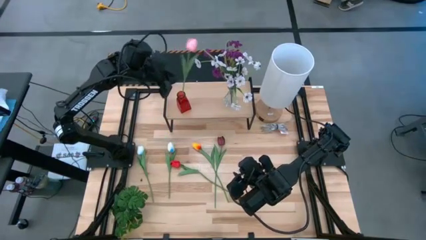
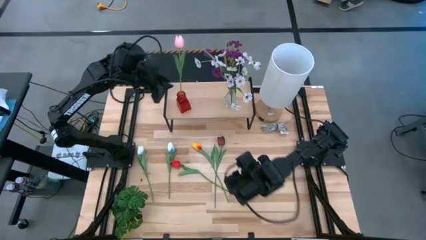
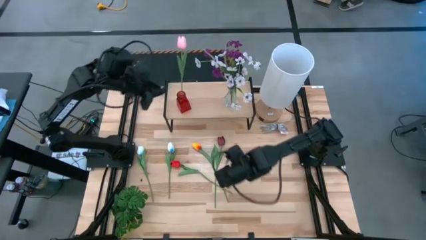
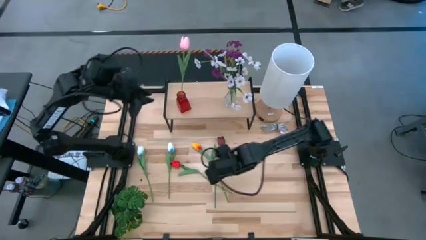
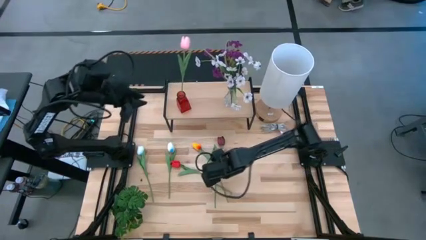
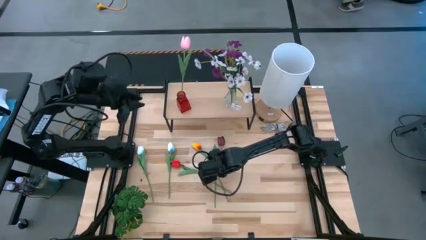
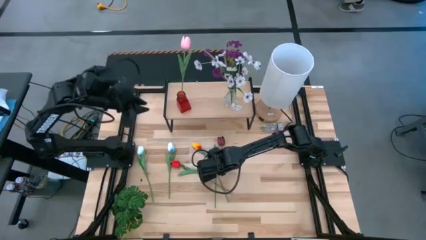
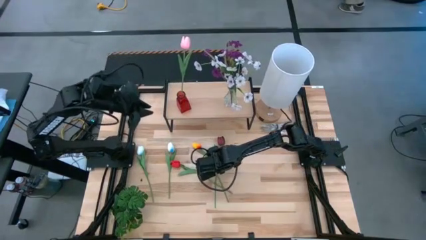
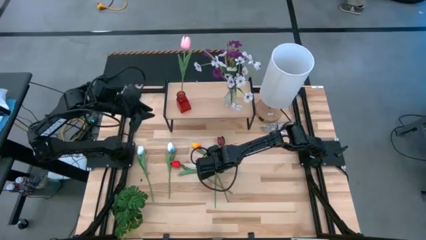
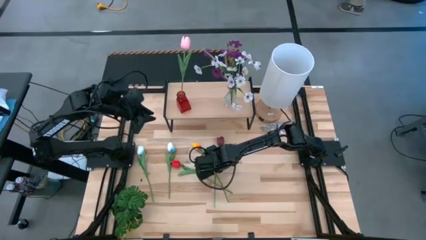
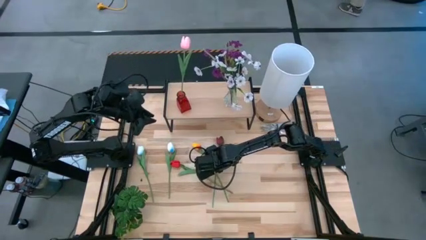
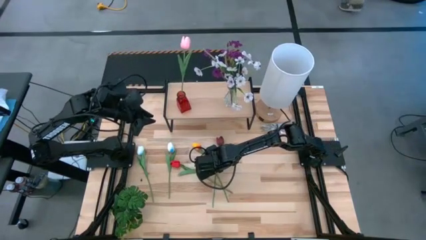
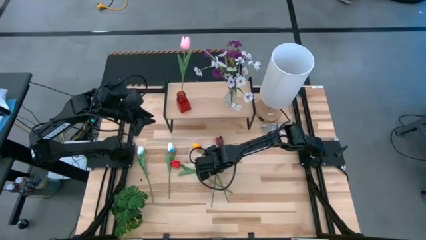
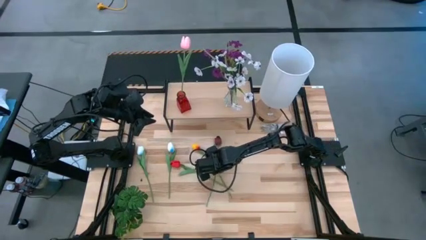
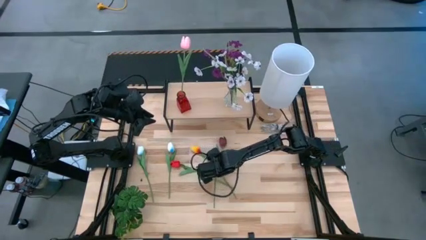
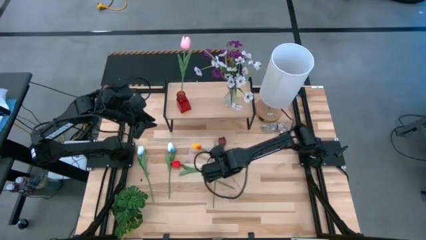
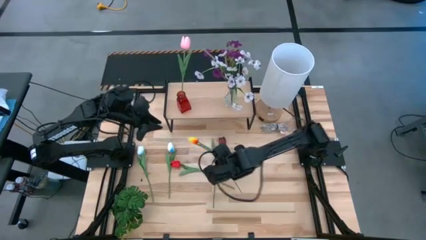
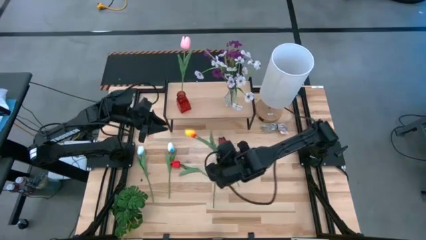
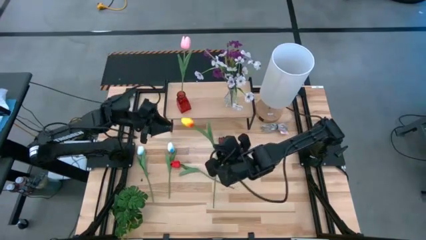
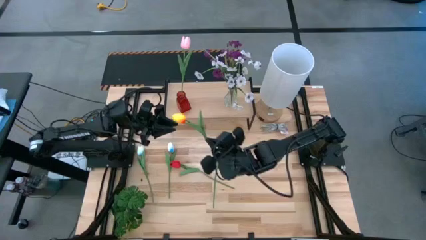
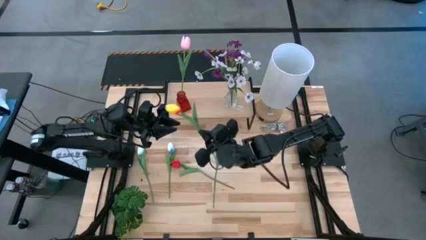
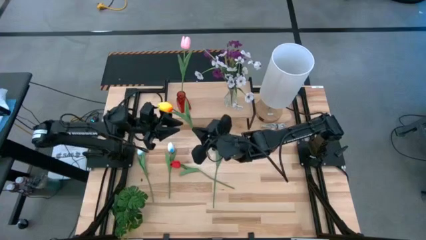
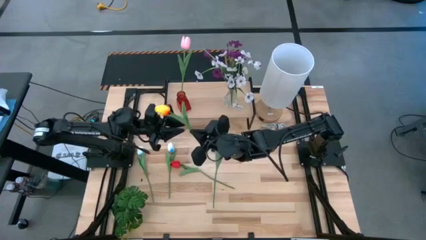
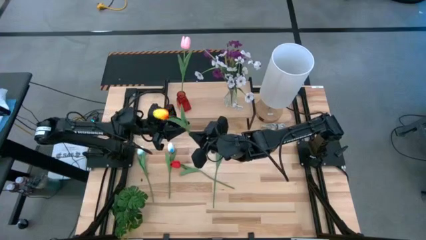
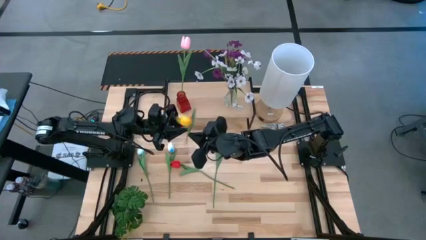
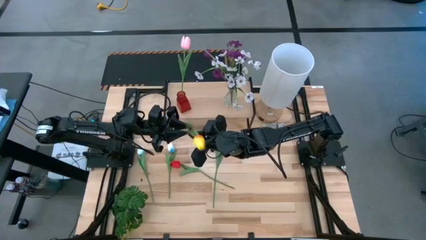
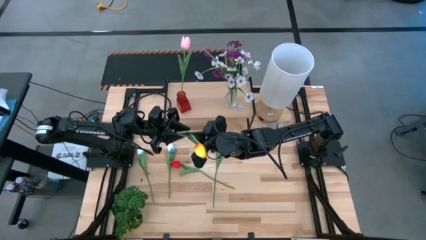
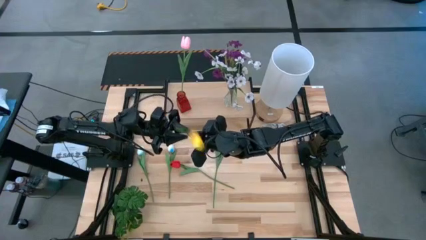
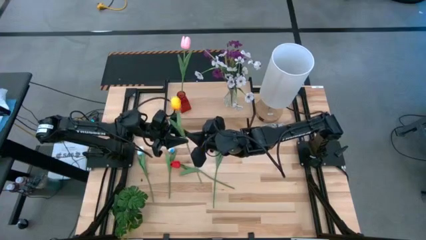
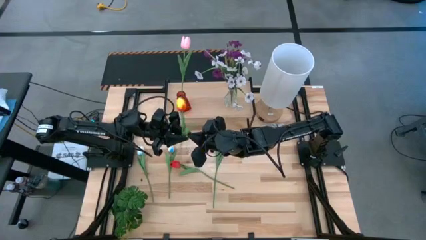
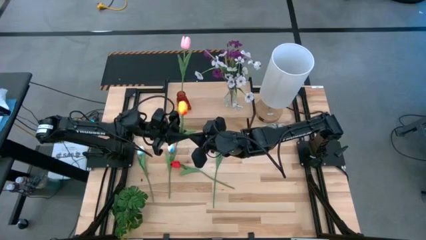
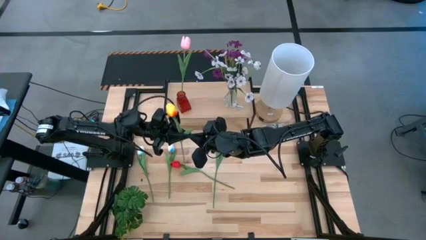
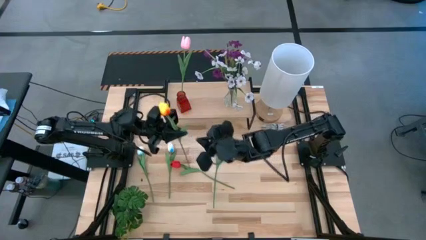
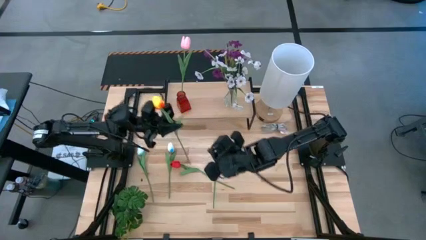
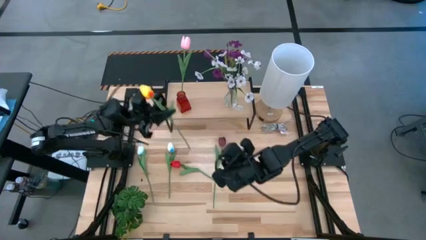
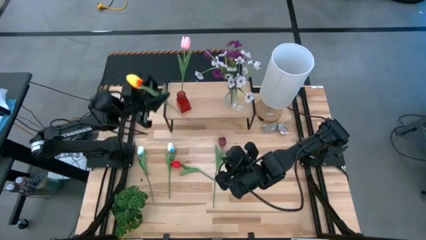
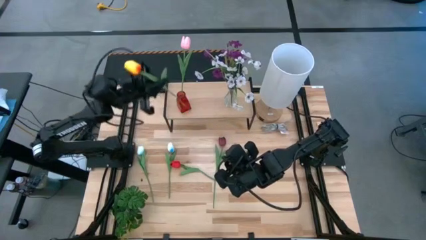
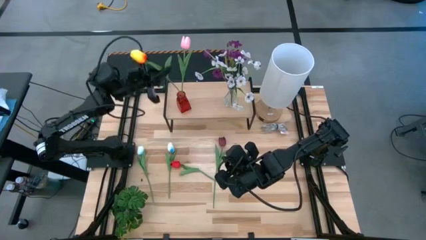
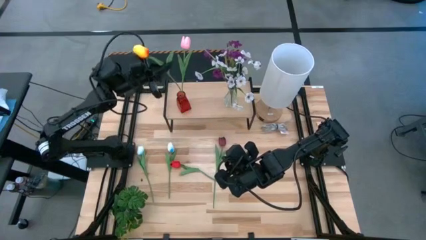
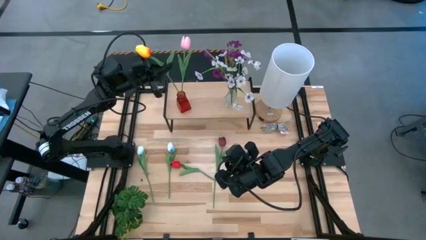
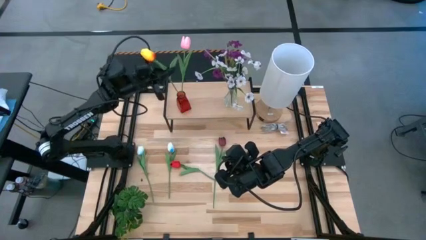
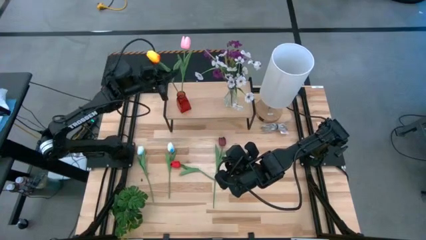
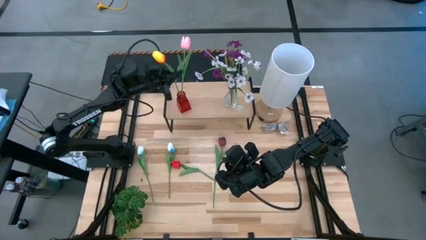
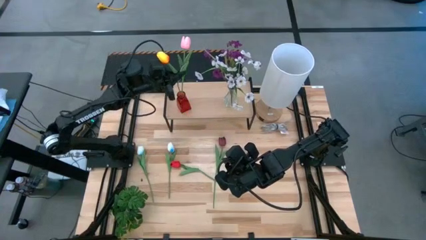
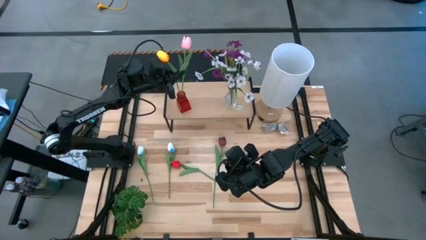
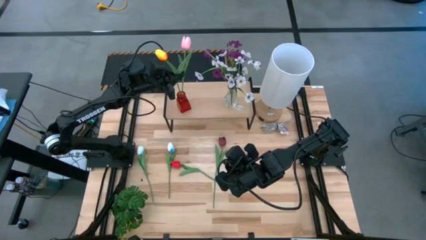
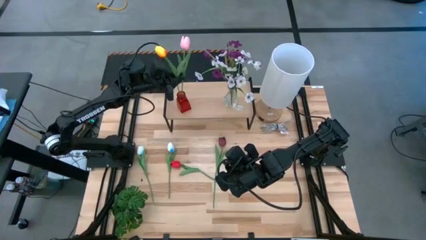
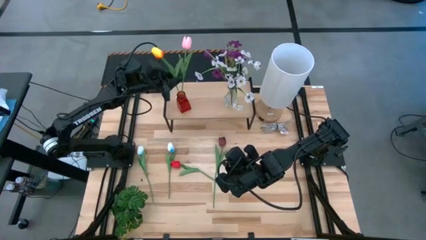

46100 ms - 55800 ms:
Task: Pick and place flowers into a vace then onto a shelf
Put the yellow flower into the red vase on the shelf

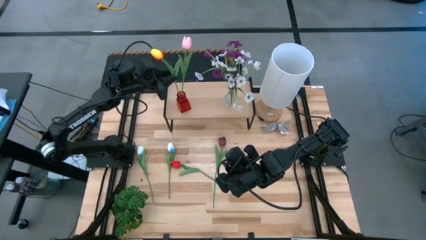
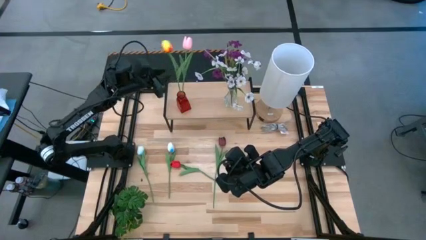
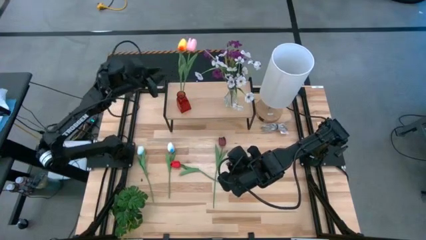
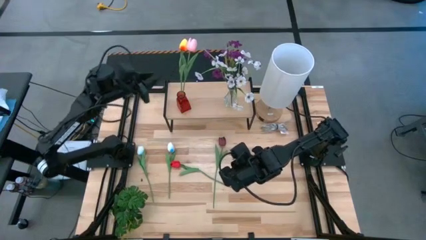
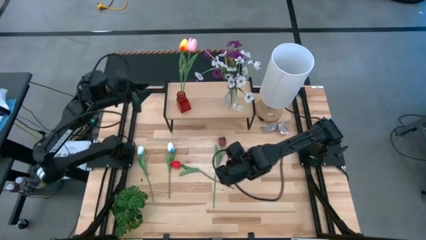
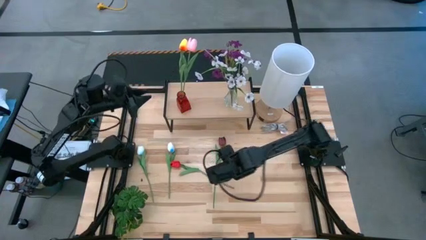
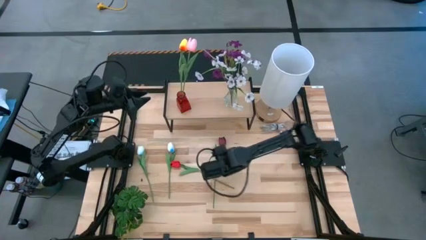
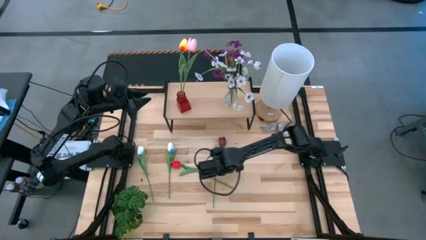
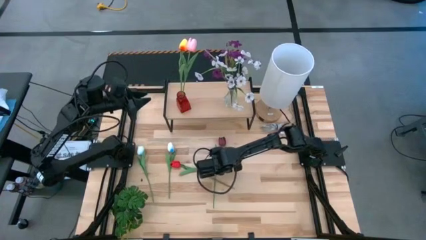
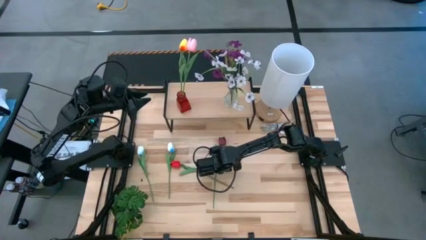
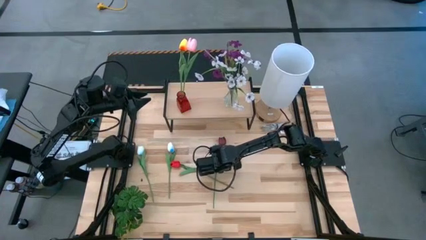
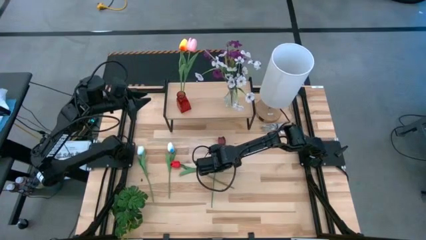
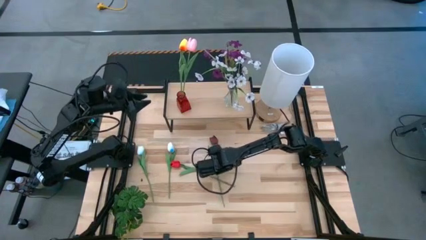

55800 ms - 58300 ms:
Put the dark red flower into the red vase on the shelf

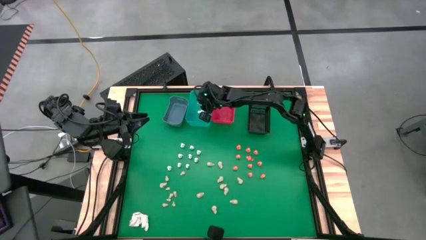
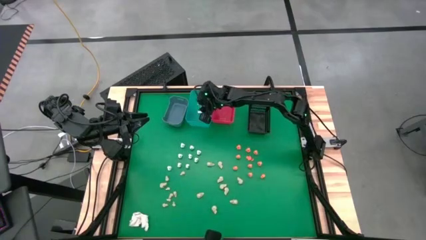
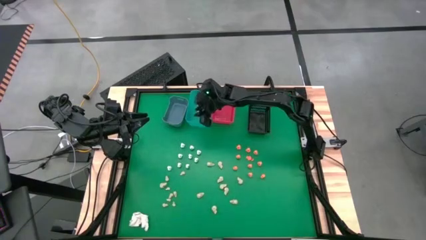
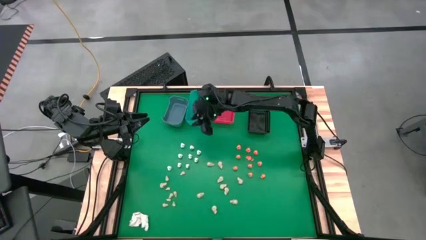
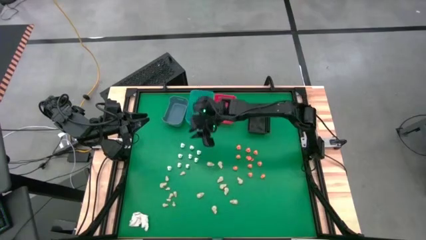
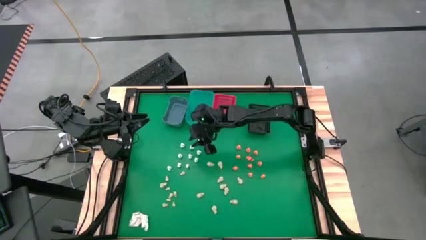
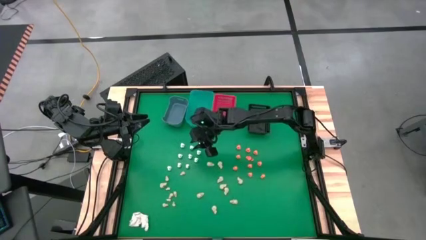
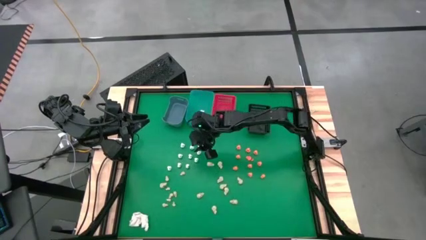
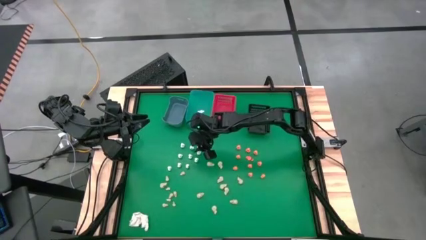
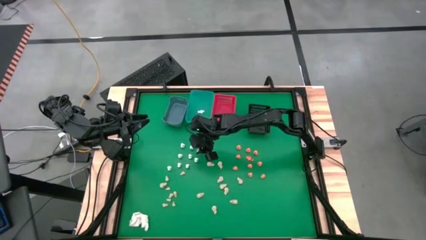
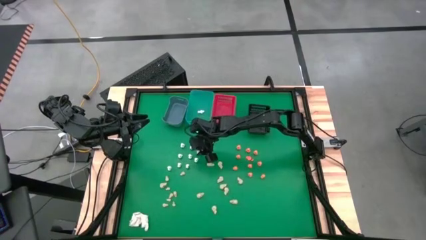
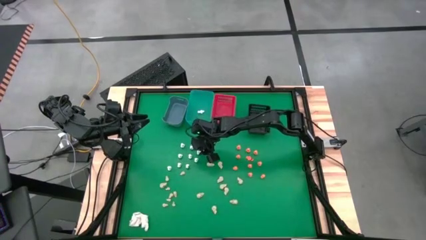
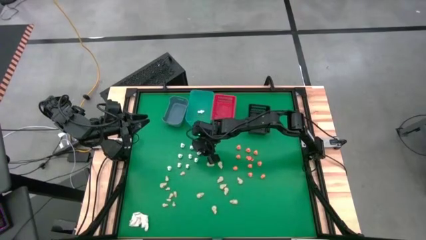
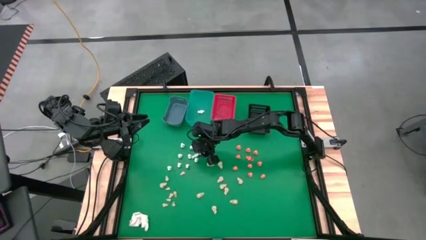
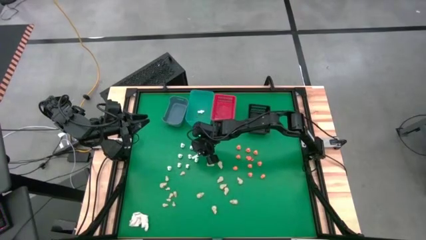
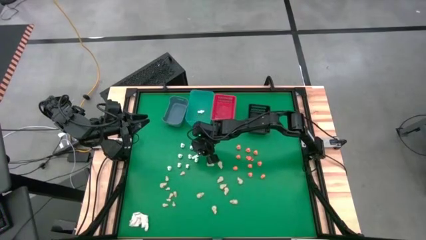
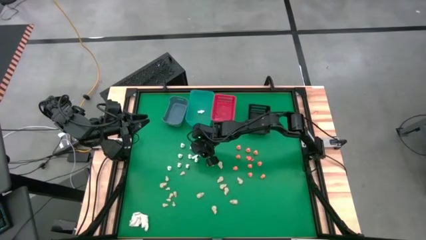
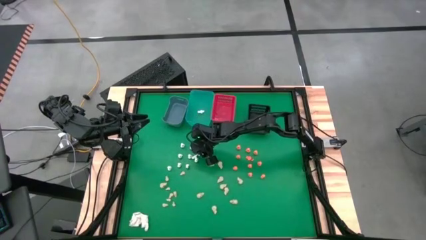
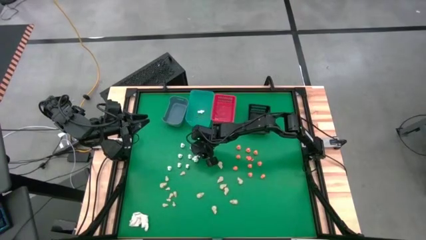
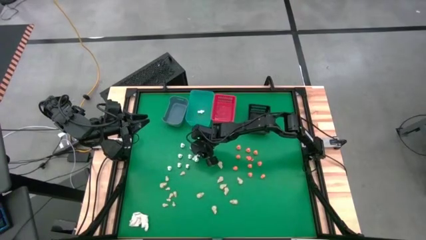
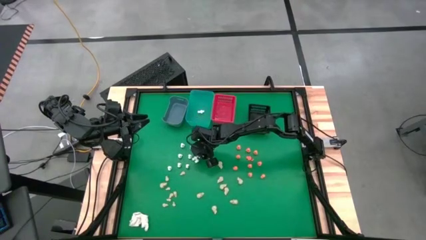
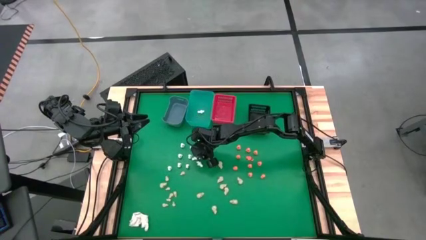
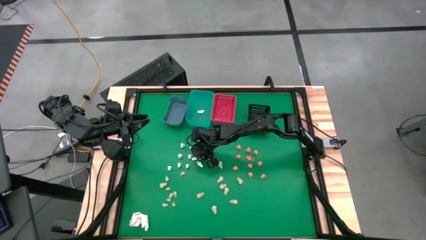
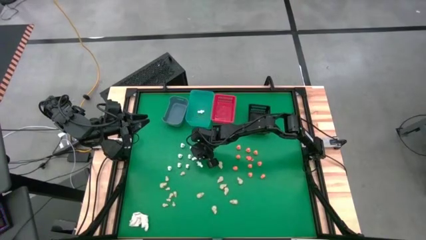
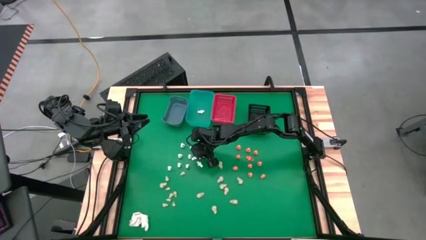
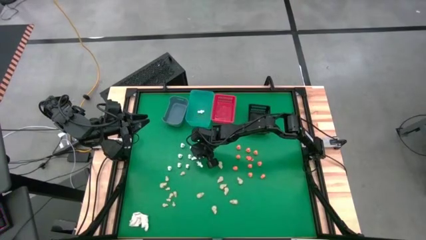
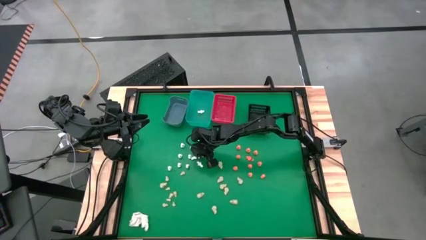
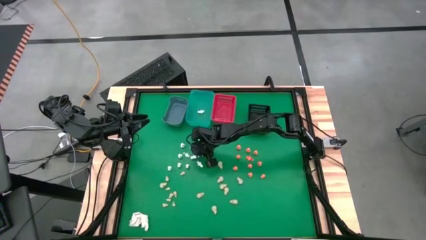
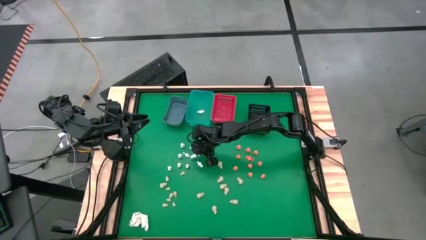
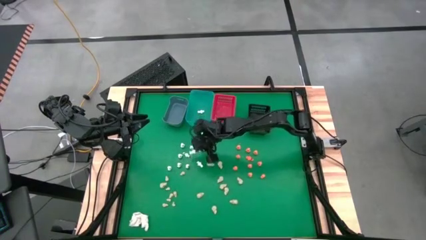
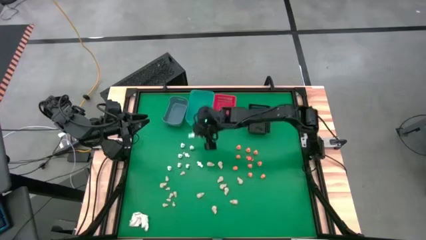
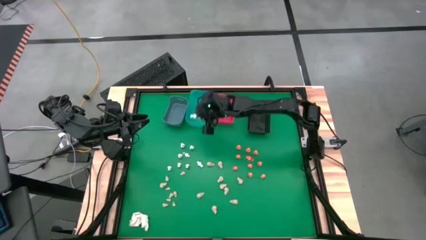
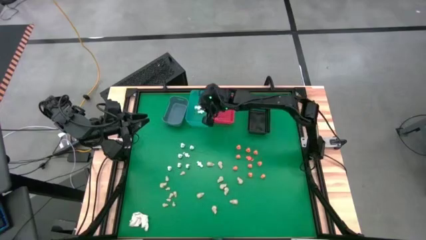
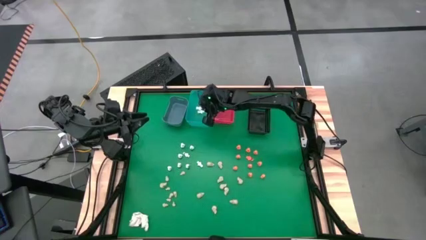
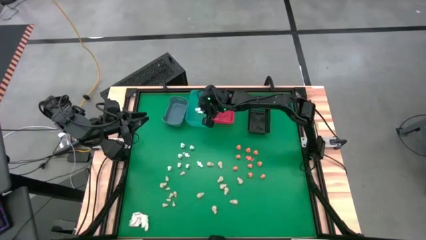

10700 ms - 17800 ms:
Task: Sort Halloween decoration
Put the white skeleton toy into the light blue bin
